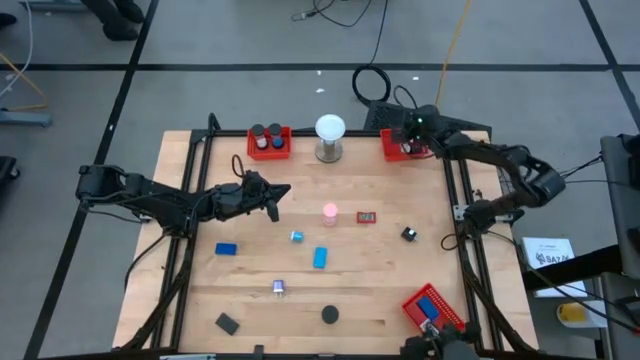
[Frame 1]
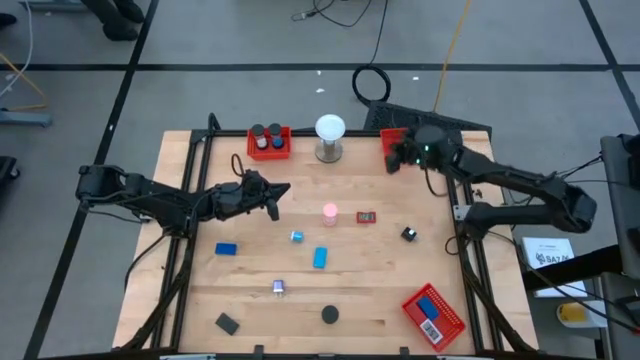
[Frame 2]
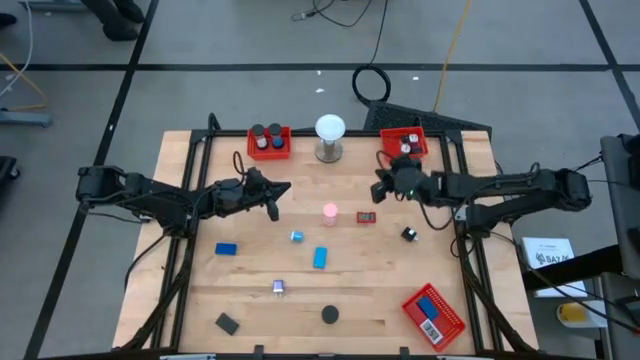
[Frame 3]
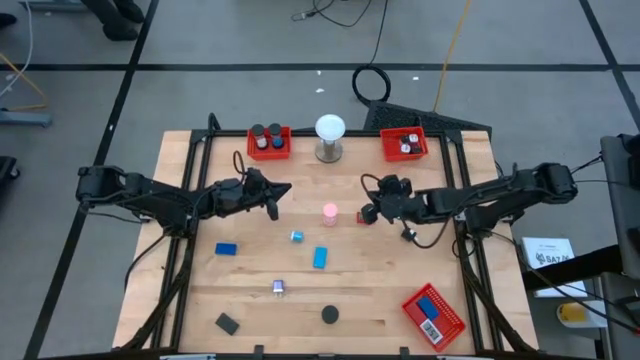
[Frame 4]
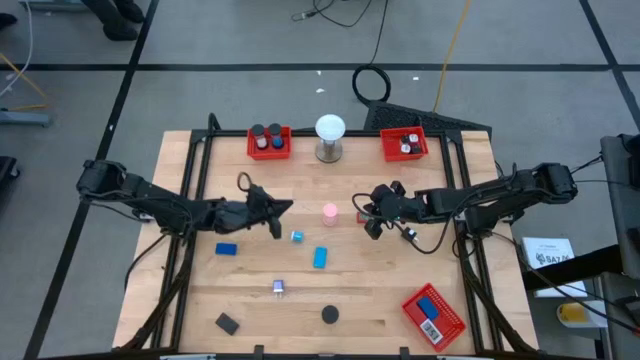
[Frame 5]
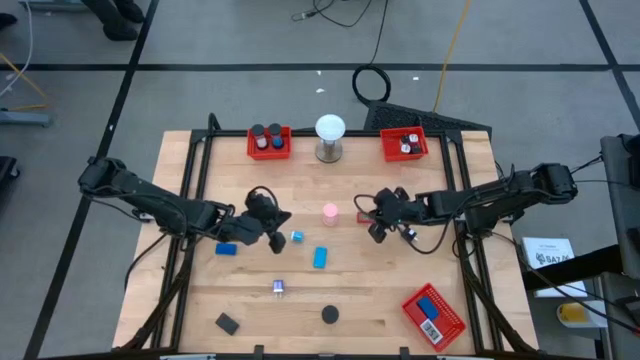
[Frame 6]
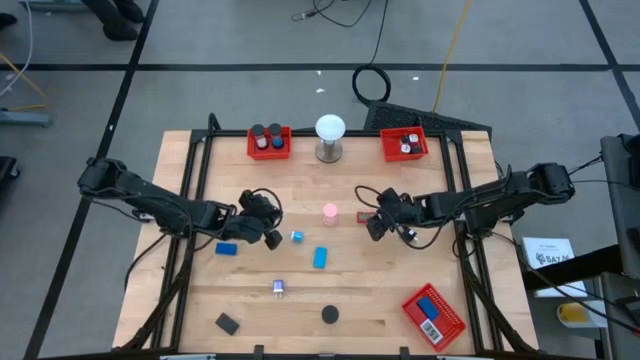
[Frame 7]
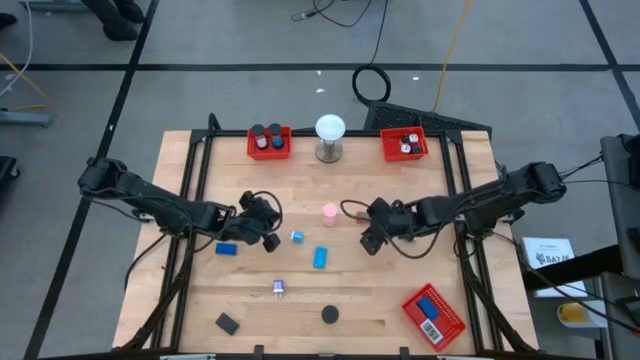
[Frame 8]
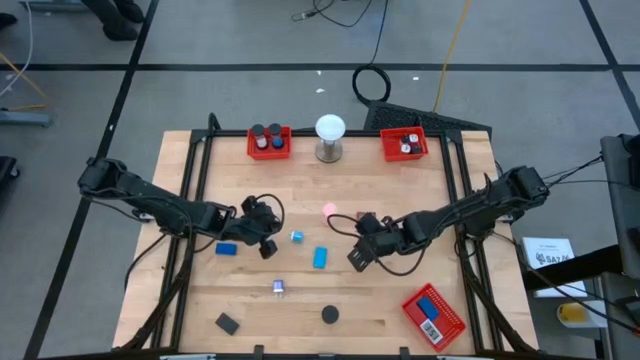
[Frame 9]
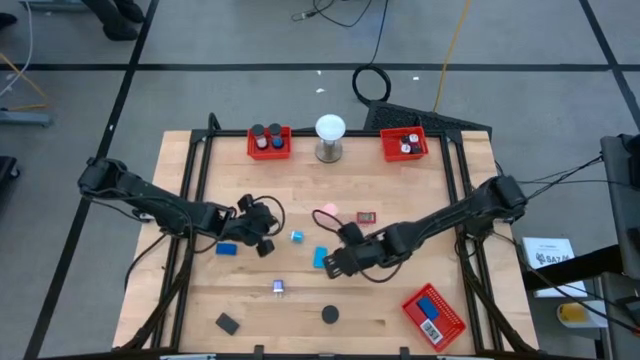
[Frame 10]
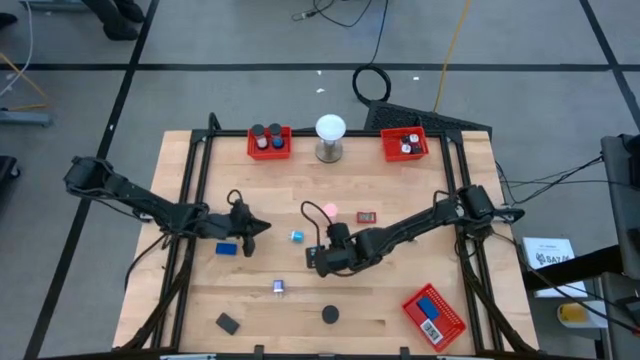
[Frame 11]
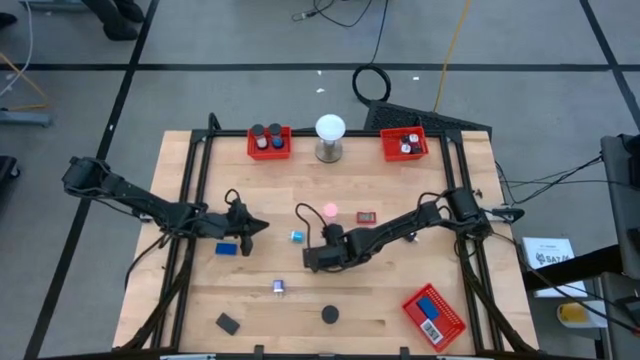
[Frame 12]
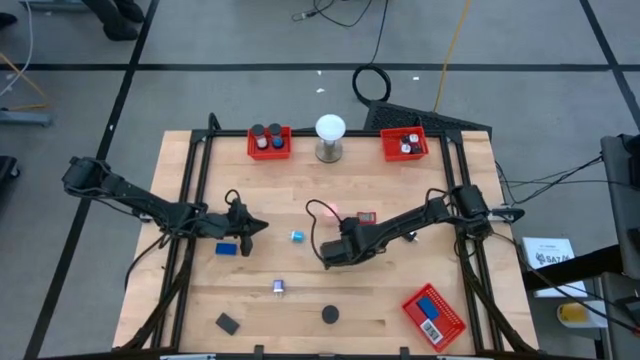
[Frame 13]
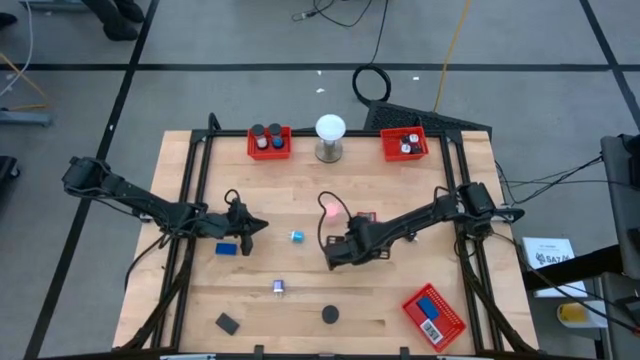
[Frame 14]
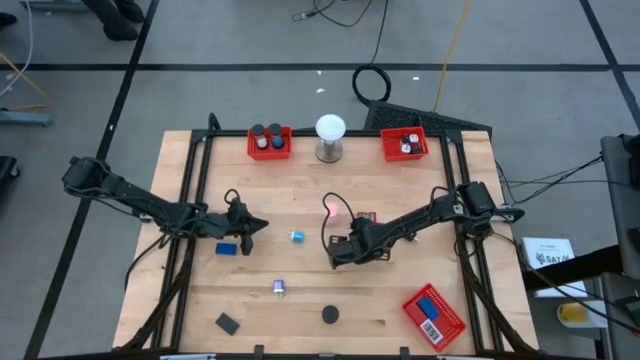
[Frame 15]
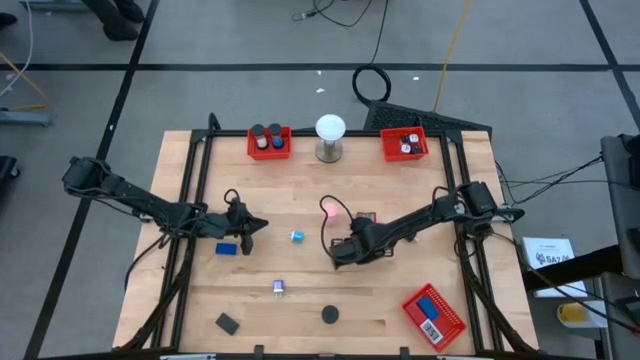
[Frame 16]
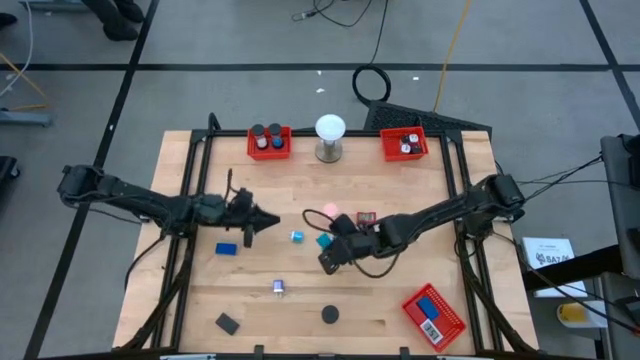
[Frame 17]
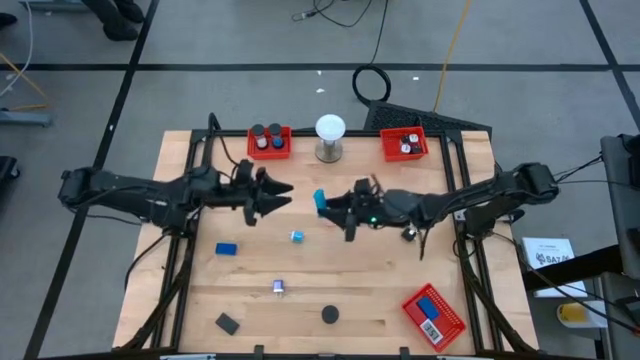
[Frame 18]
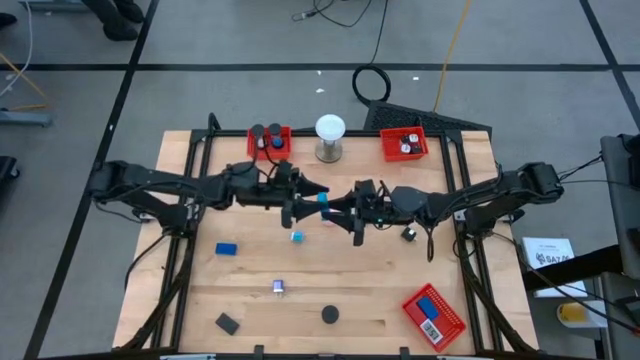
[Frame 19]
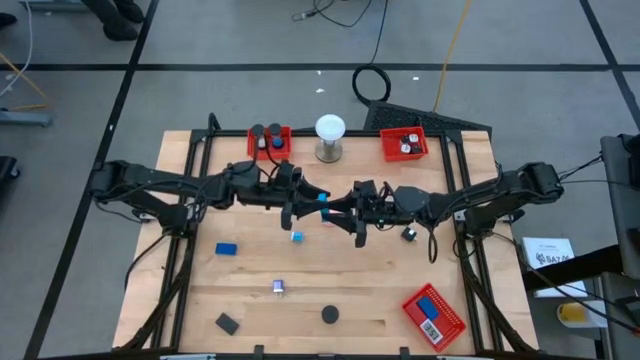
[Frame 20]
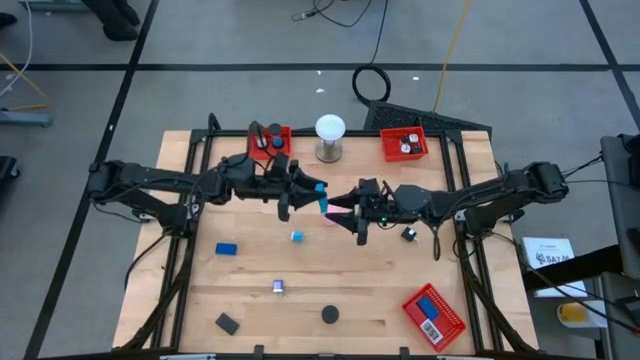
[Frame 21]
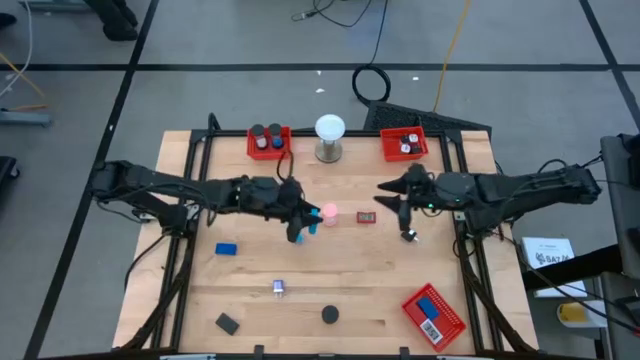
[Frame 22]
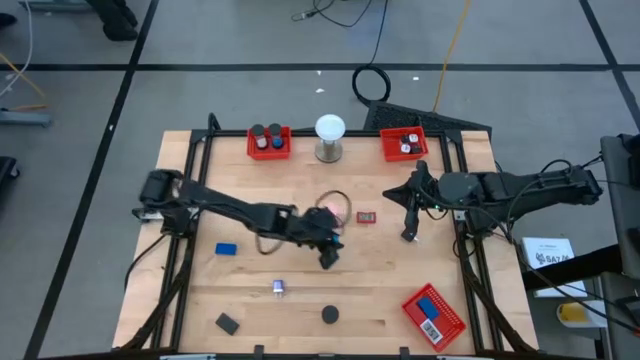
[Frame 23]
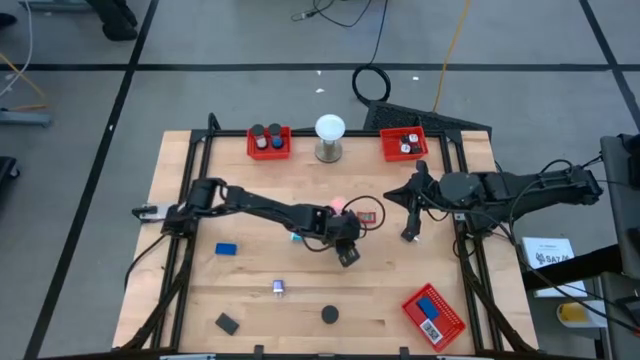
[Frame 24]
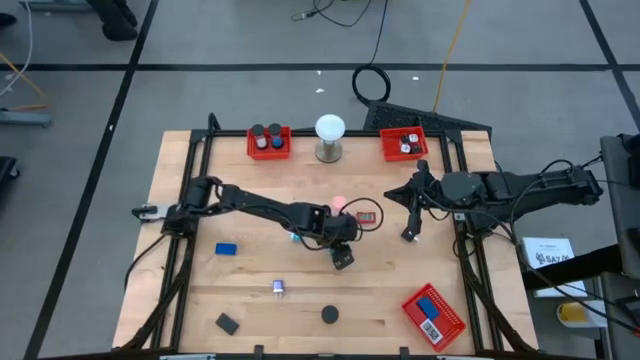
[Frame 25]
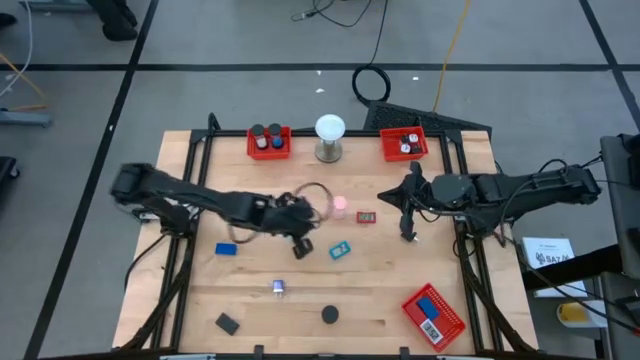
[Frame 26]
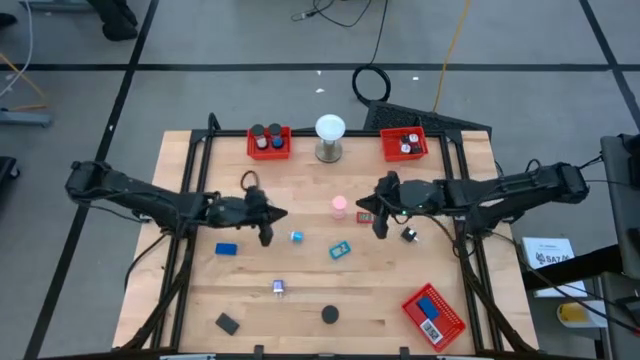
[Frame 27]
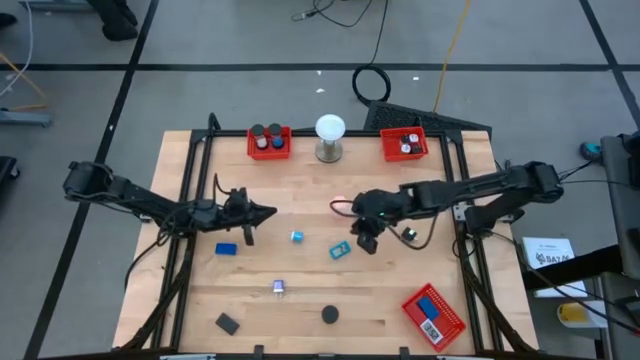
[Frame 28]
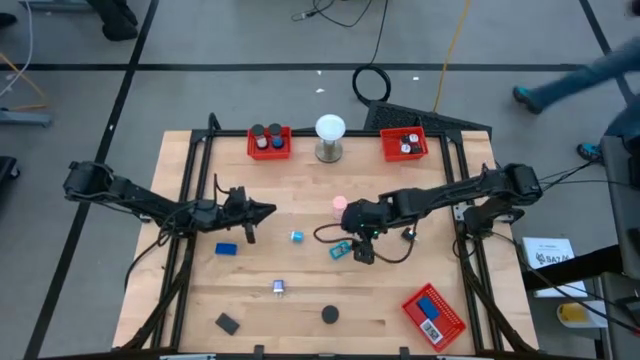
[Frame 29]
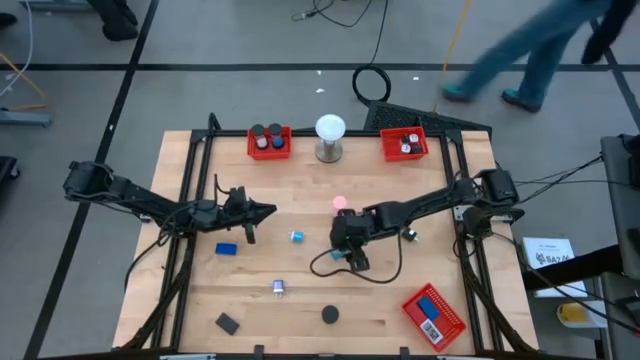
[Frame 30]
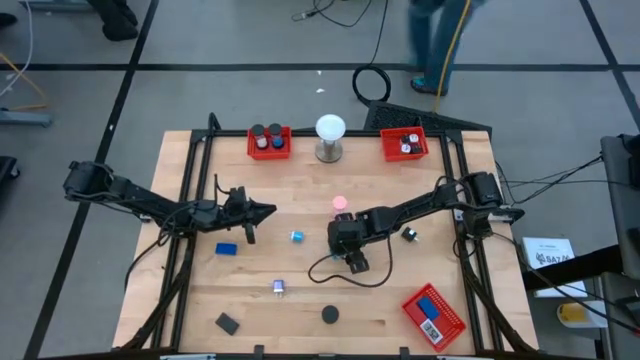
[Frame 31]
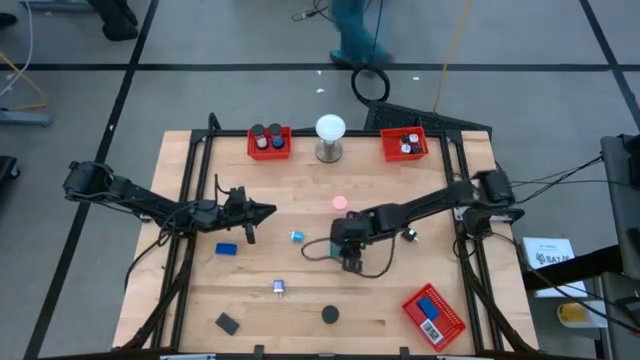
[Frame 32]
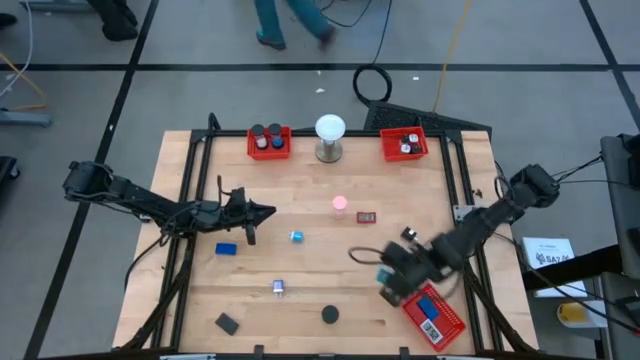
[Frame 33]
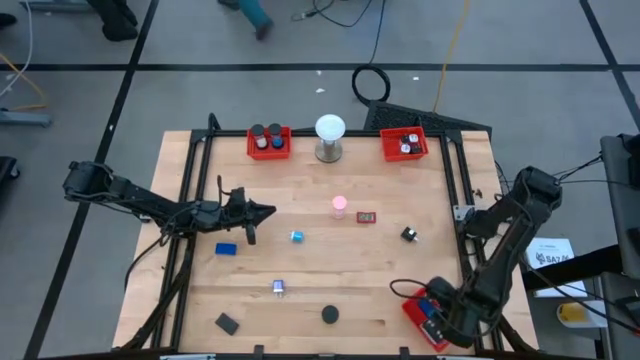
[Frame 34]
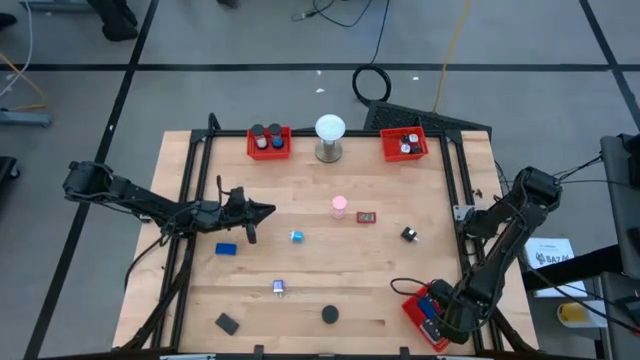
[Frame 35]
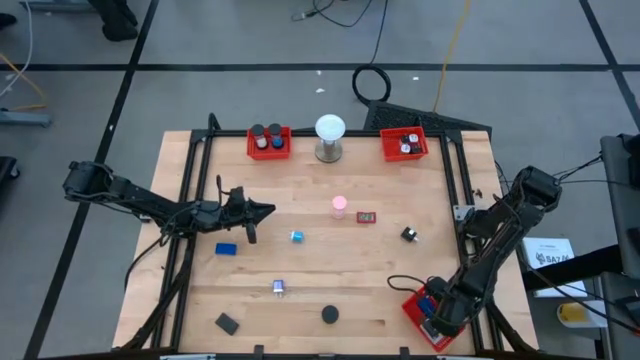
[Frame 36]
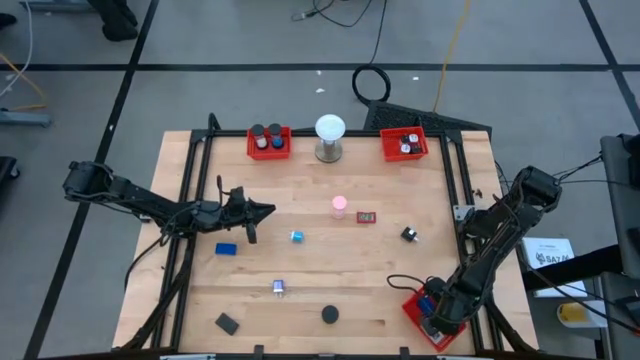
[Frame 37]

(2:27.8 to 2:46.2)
Task: Pick & Place Office items
Put the light blue digital clock into the bottom right red bin
